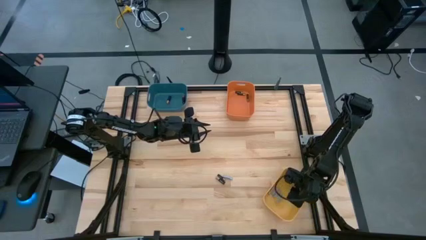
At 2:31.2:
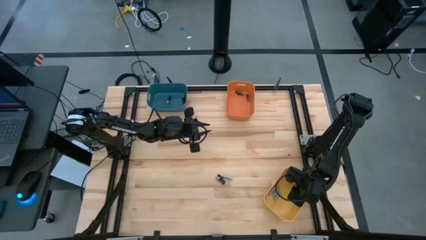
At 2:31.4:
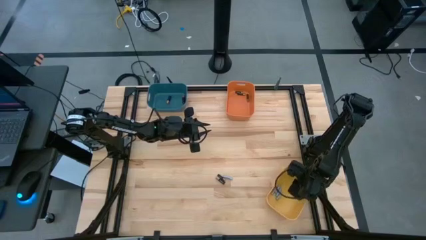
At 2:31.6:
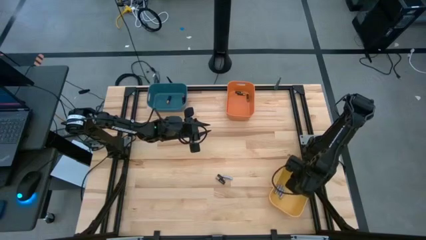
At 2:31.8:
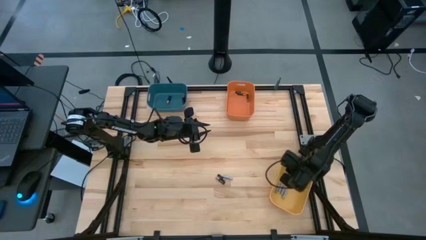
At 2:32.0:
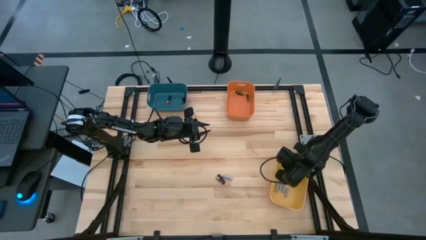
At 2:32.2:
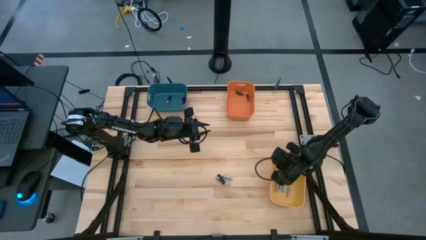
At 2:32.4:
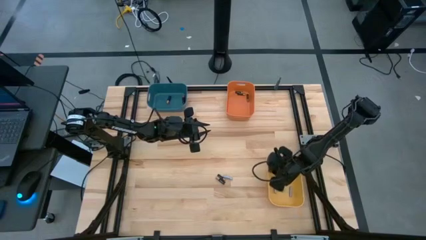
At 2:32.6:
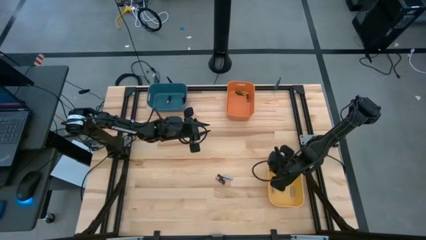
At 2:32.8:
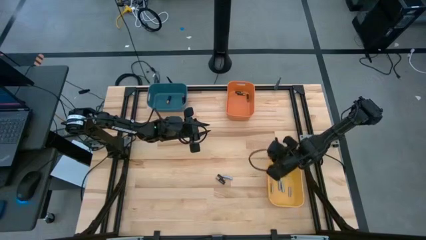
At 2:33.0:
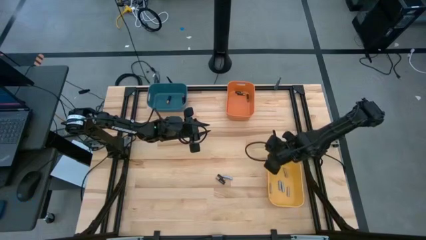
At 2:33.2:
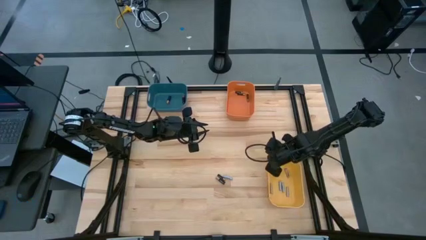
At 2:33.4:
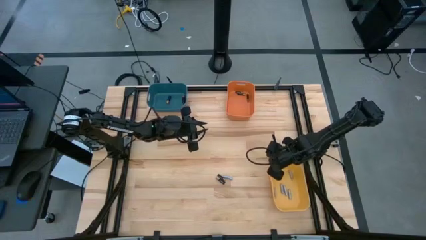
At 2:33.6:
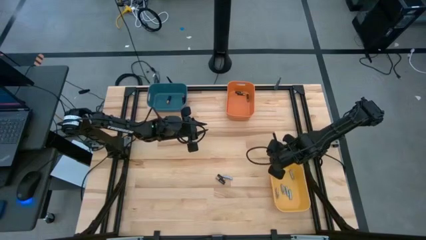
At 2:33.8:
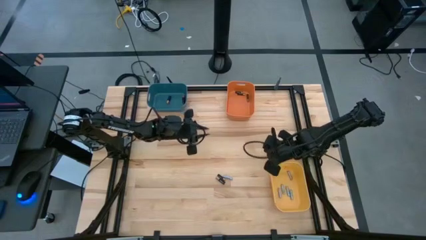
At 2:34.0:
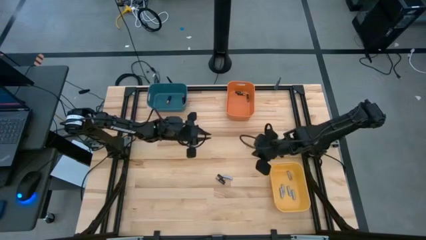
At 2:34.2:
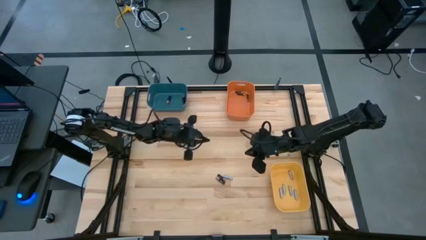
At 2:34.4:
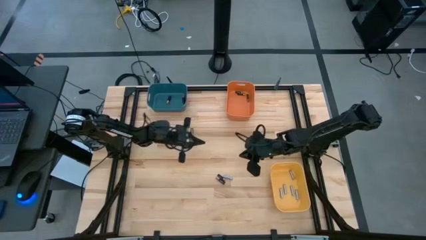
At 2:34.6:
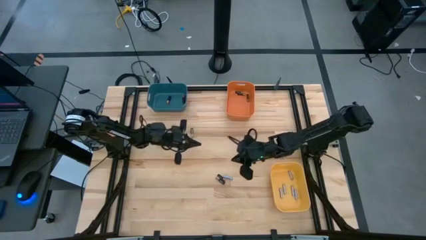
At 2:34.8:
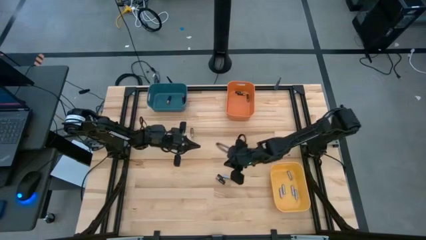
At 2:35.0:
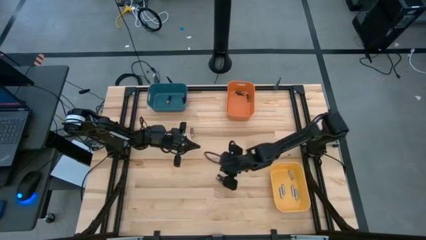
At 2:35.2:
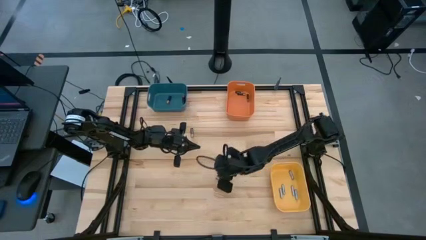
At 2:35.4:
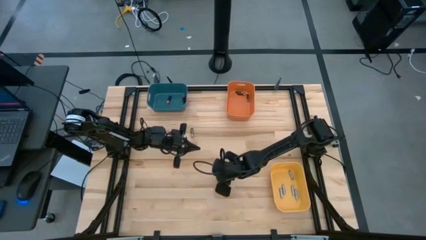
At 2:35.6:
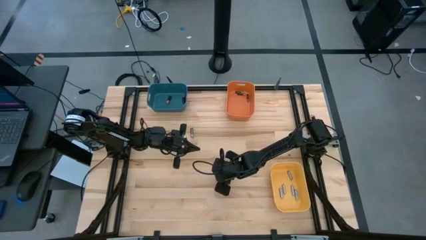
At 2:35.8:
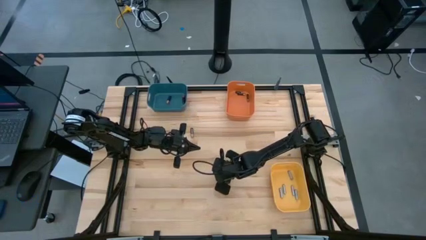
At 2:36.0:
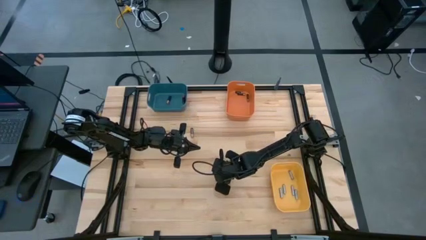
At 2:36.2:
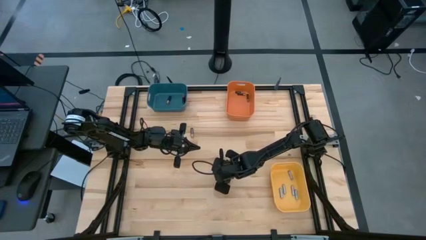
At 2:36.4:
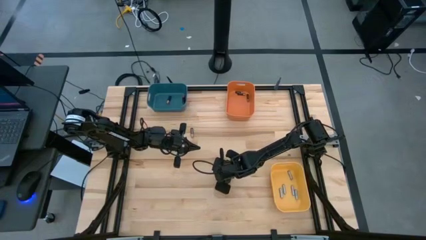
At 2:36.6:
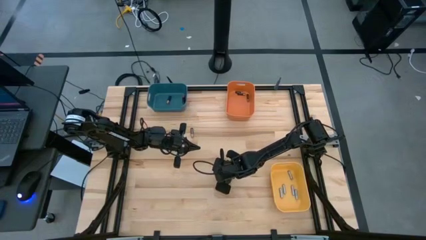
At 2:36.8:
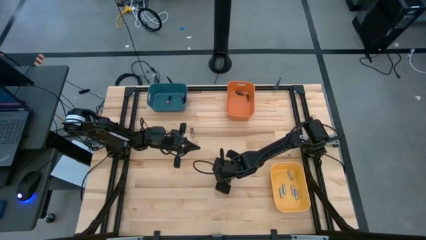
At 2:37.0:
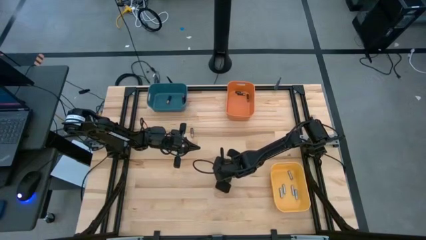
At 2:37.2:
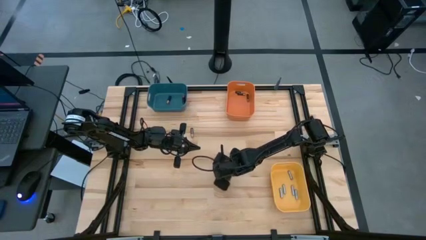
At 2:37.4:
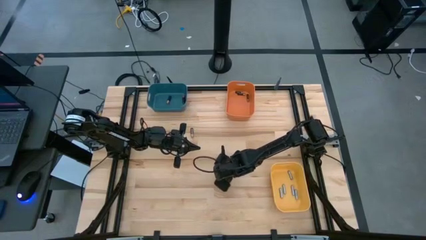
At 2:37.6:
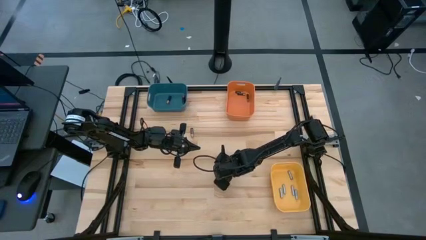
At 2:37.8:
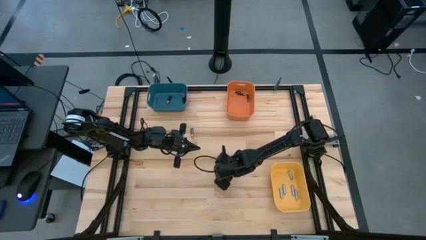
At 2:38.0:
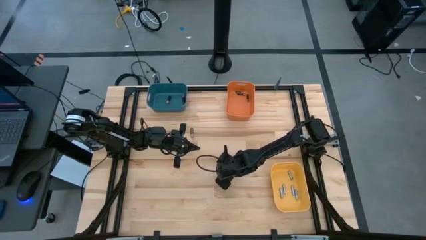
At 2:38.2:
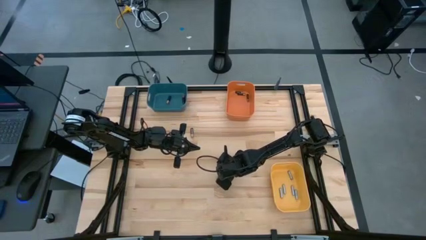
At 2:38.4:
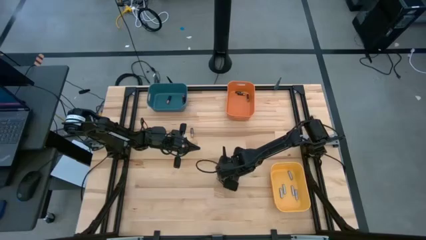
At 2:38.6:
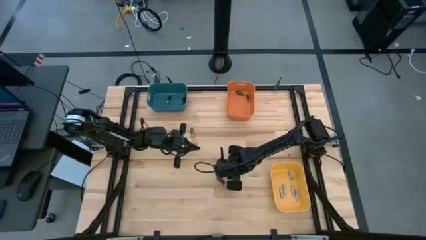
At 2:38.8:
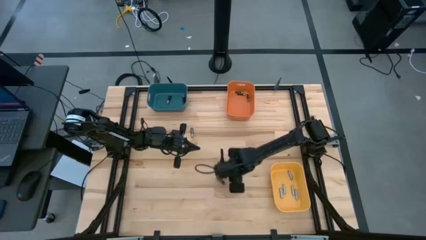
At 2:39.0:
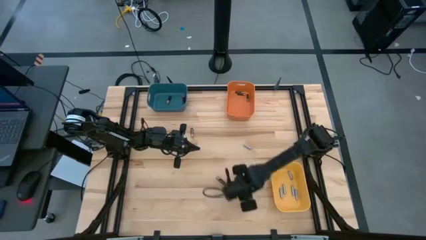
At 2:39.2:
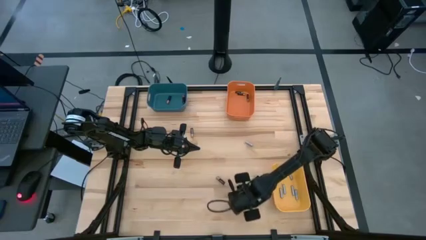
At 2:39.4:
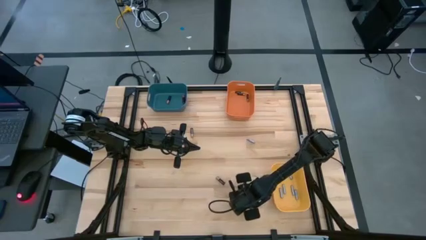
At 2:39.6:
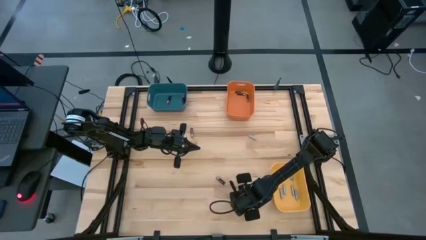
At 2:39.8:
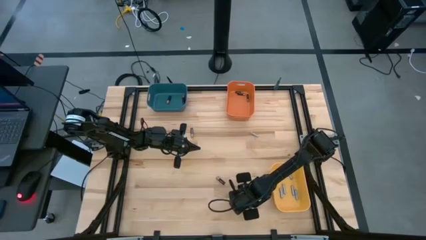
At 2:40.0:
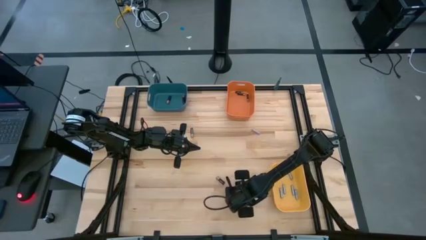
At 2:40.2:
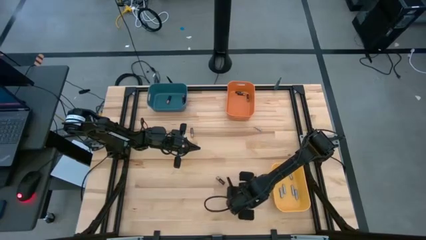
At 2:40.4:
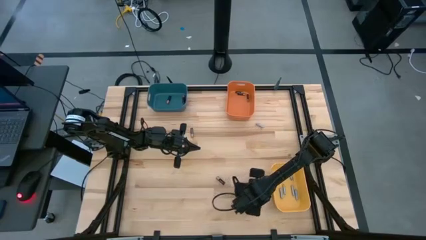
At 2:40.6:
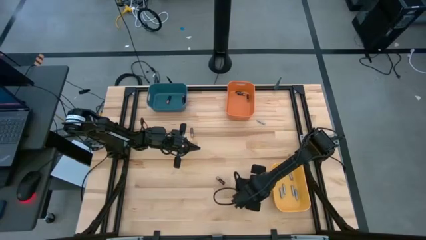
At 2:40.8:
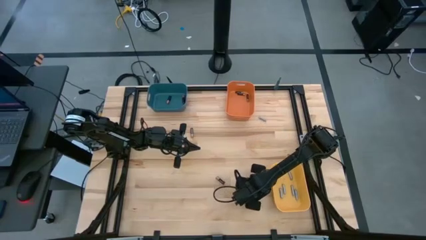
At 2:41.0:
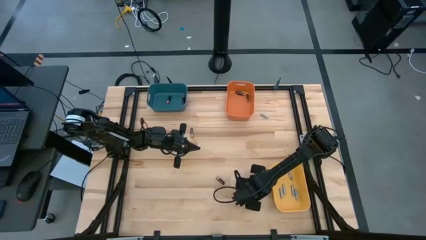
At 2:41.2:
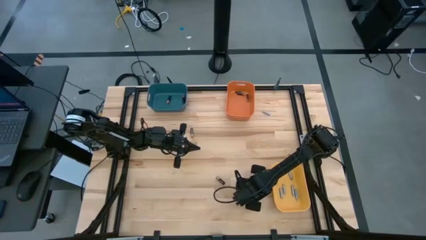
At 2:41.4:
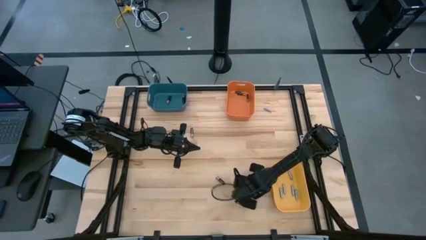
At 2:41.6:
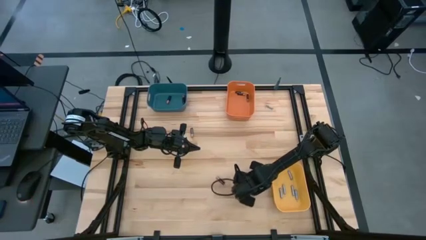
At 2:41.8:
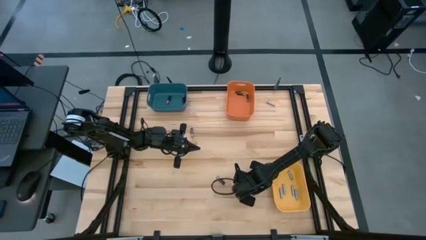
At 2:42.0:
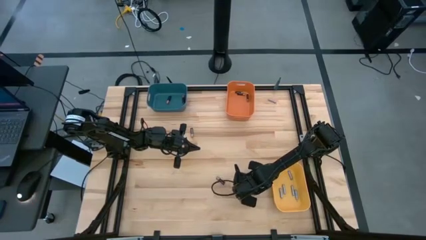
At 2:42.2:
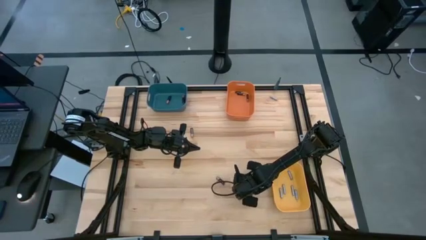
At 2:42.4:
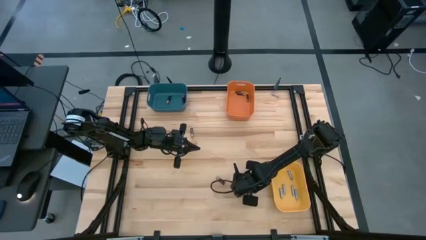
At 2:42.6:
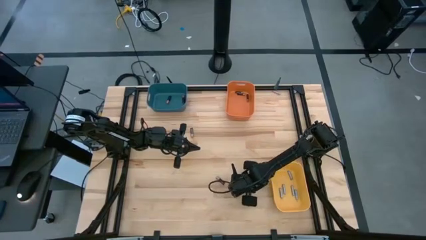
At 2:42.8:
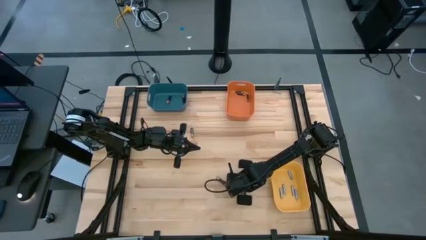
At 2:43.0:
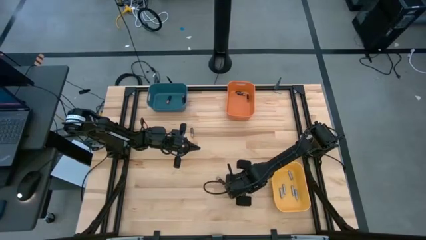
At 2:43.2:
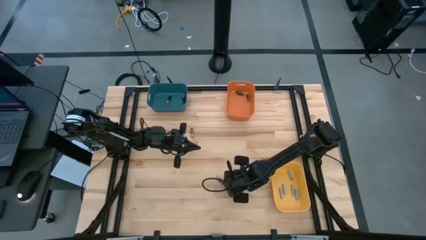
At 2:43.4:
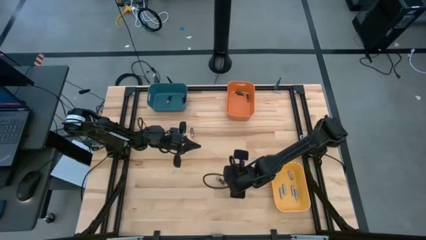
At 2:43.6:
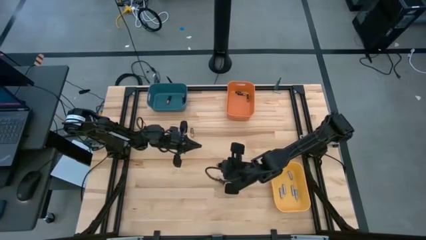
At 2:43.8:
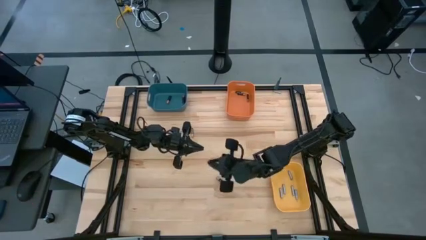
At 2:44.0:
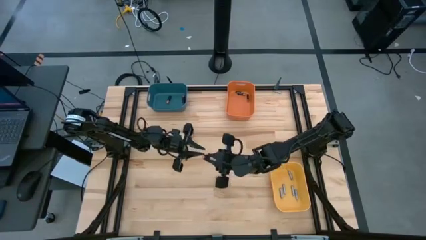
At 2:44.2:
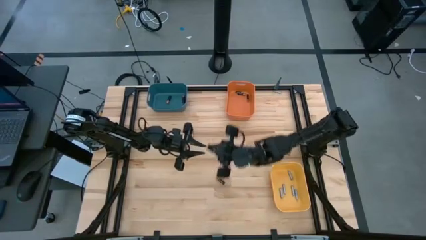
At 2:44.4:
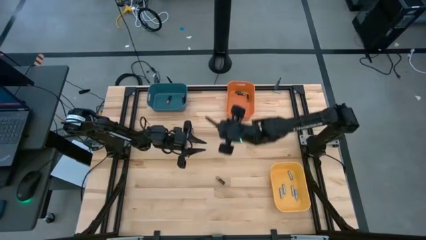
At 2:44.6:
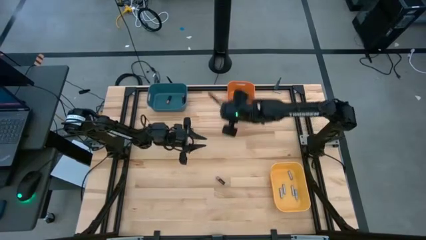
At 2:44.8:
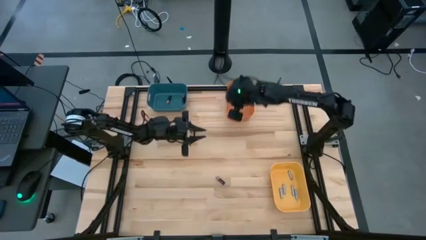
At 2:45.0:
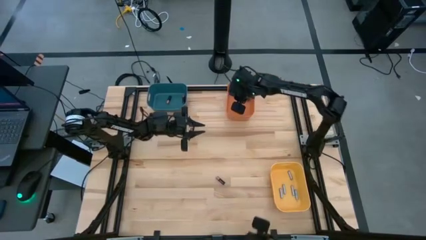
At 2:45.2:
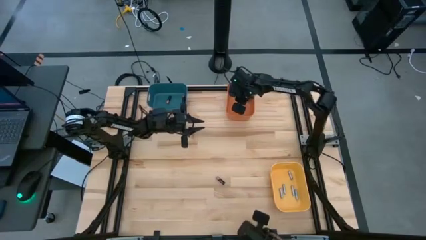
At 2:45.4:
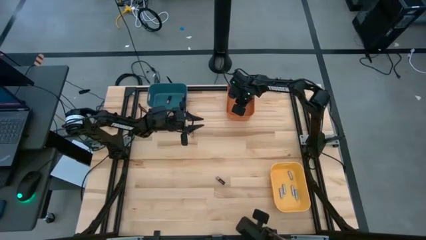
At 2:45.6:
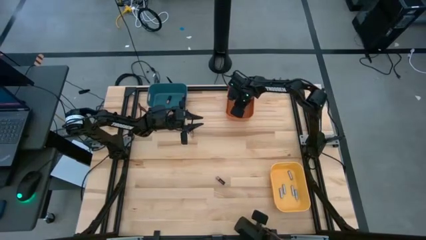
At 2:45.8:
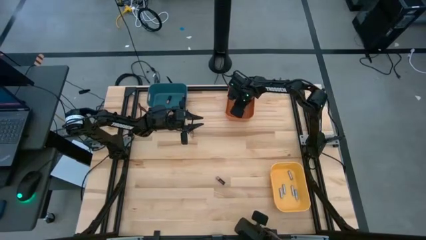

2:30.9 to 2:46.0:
Task: Sort batteries
Put the small black battery into the orange bin
